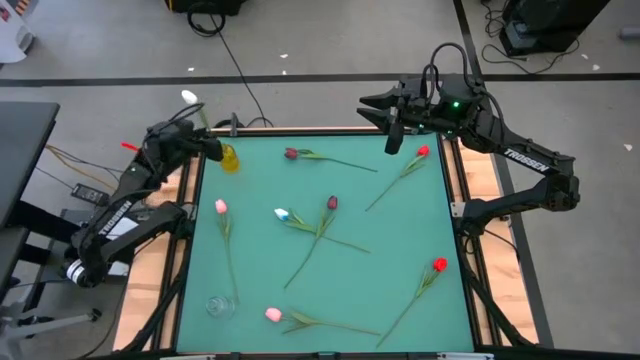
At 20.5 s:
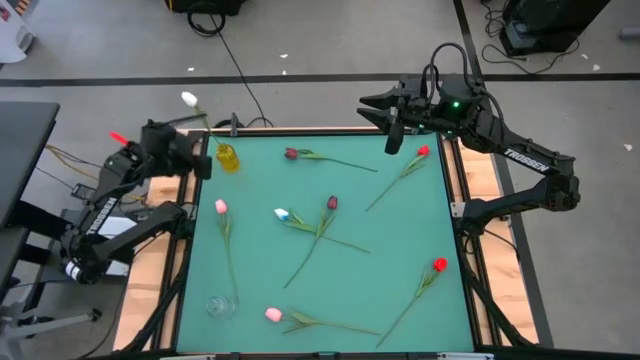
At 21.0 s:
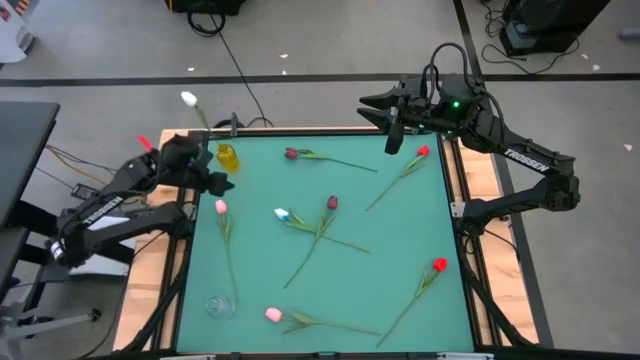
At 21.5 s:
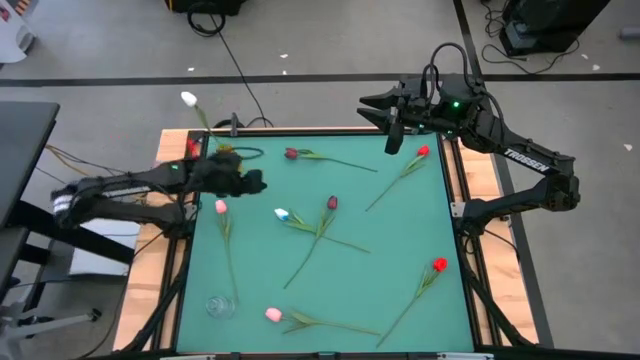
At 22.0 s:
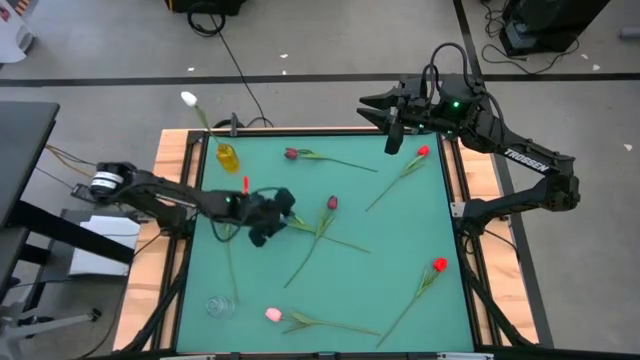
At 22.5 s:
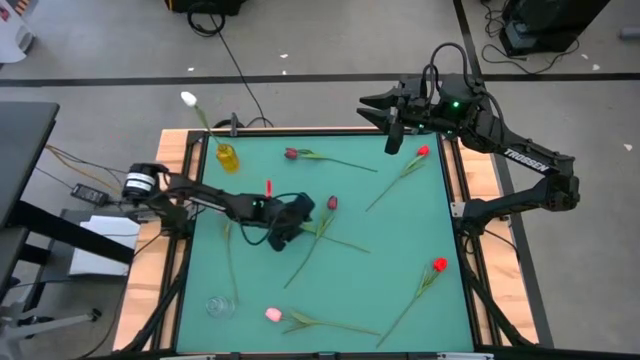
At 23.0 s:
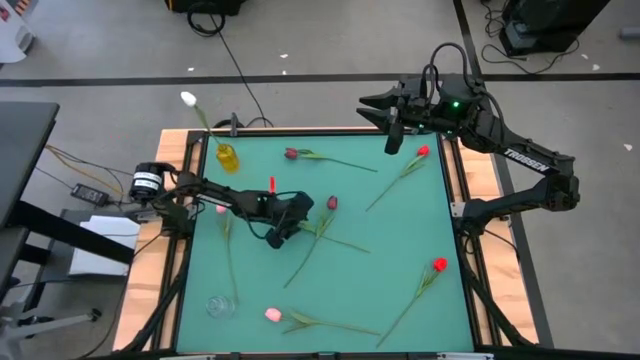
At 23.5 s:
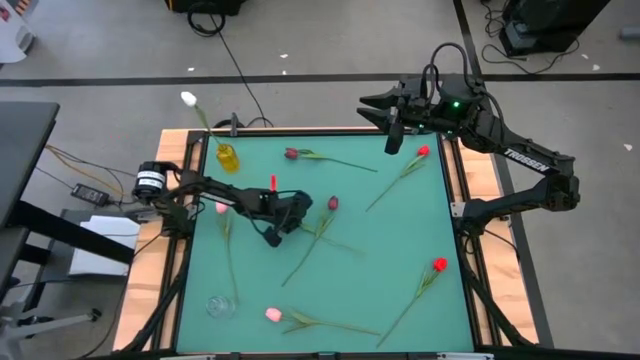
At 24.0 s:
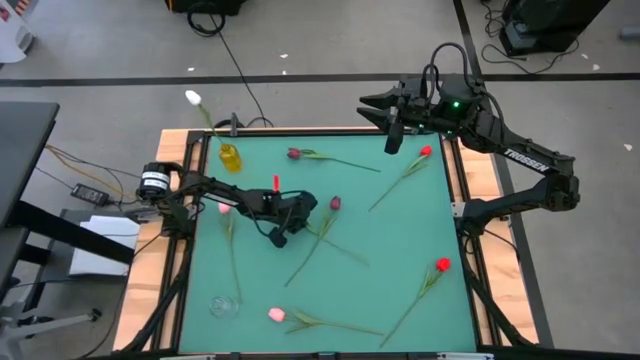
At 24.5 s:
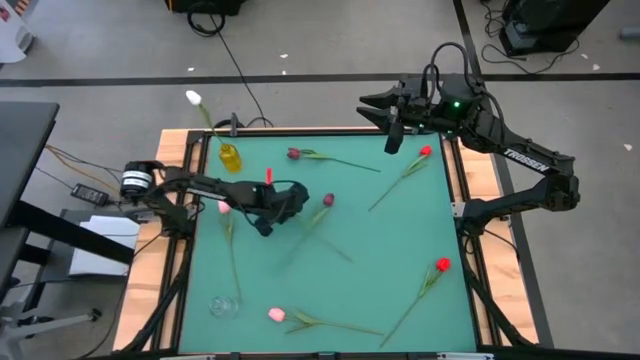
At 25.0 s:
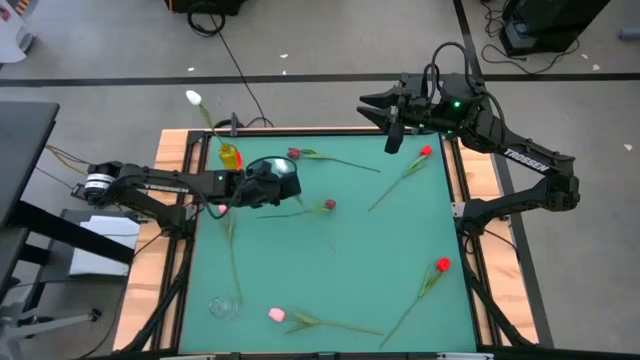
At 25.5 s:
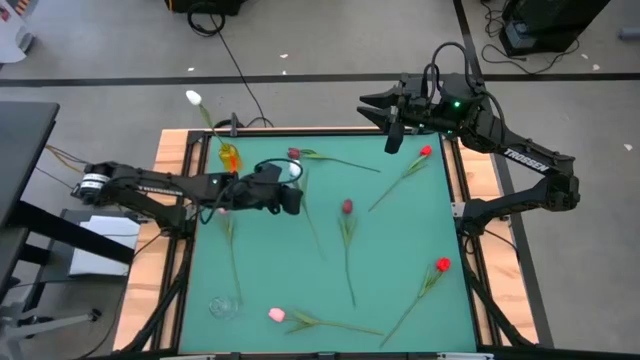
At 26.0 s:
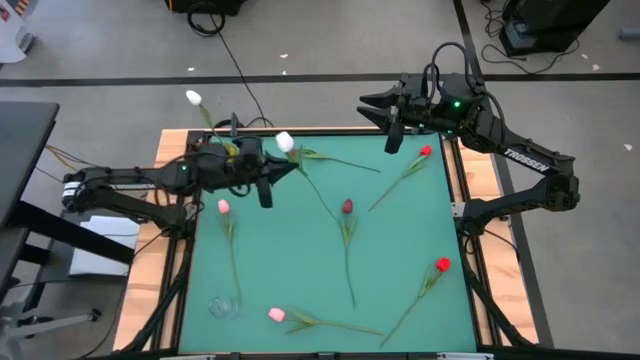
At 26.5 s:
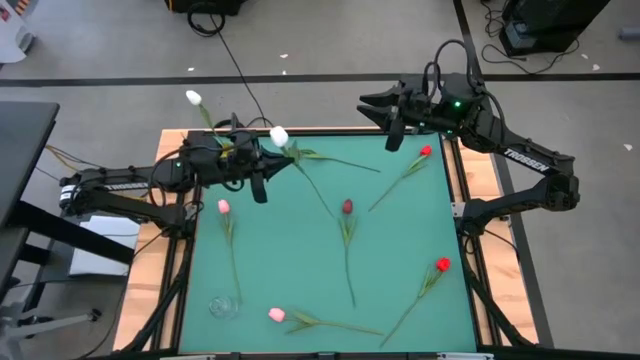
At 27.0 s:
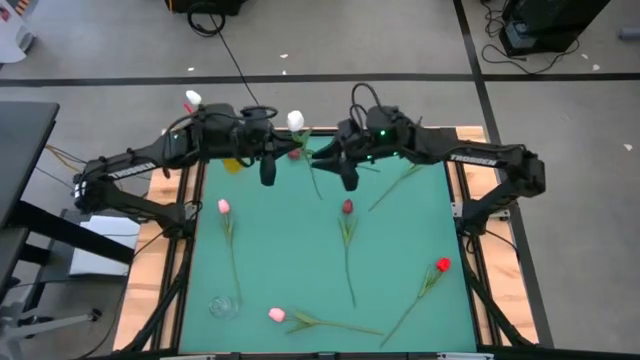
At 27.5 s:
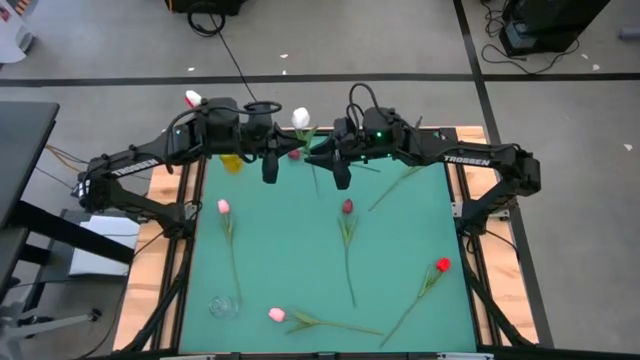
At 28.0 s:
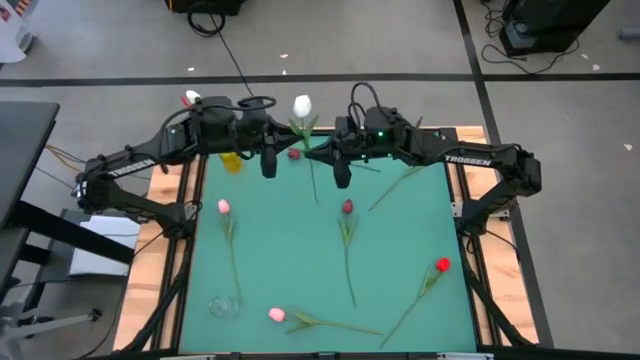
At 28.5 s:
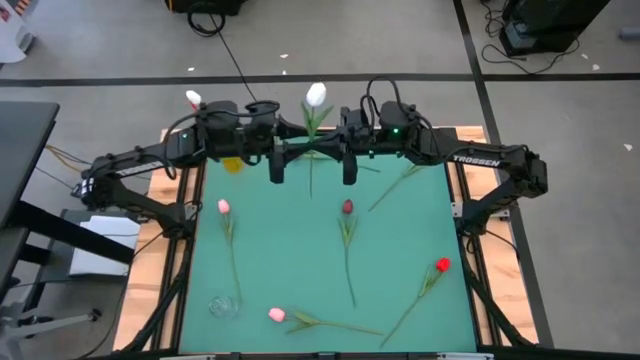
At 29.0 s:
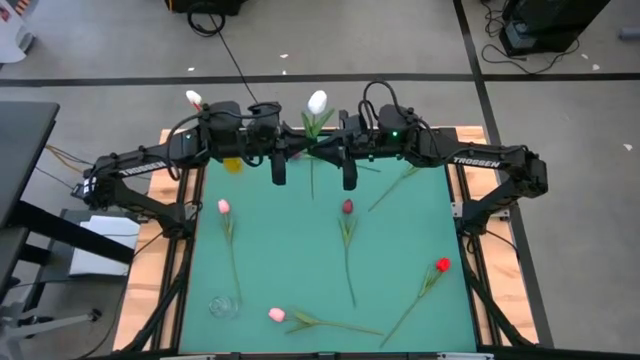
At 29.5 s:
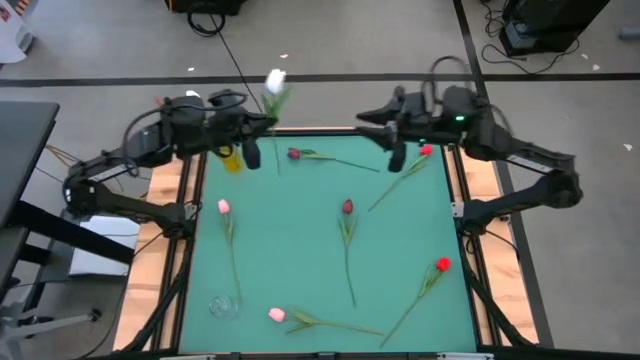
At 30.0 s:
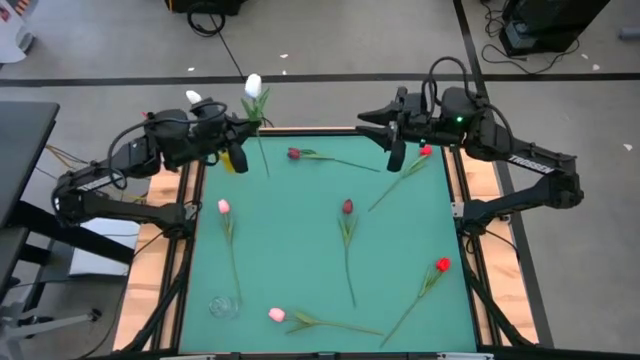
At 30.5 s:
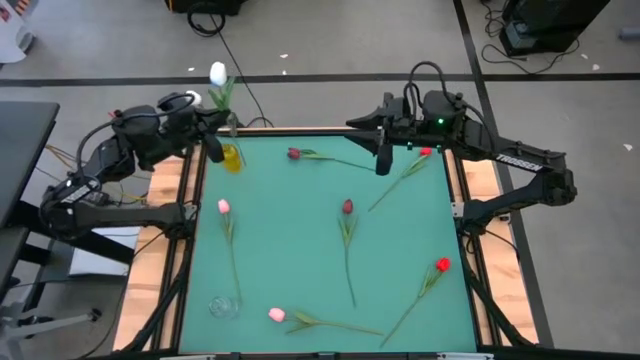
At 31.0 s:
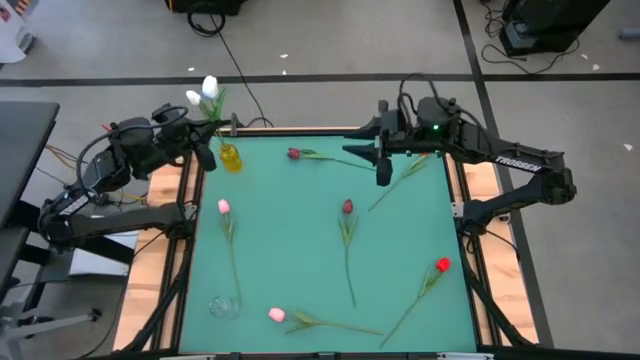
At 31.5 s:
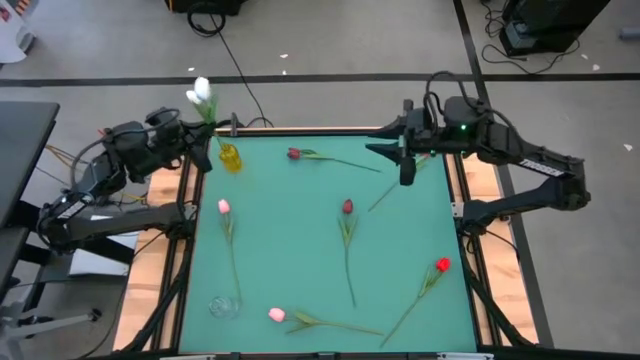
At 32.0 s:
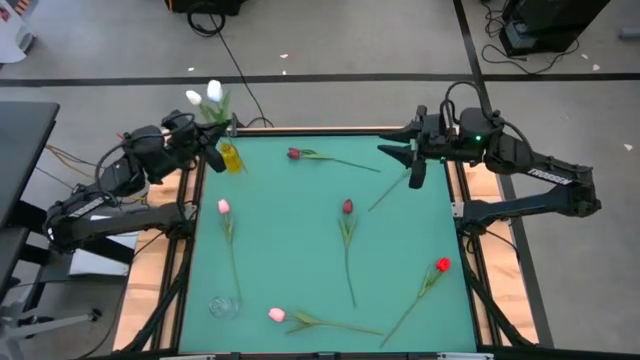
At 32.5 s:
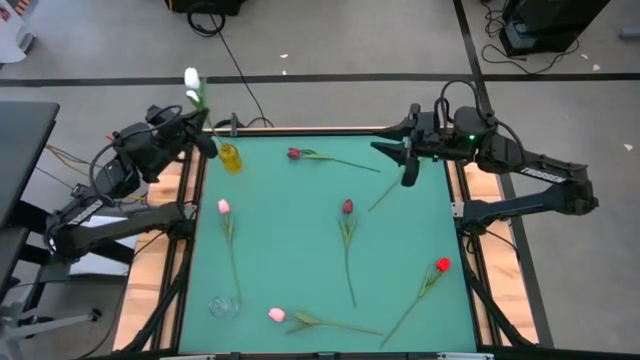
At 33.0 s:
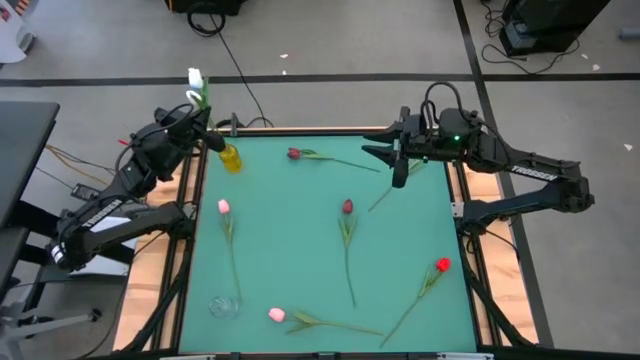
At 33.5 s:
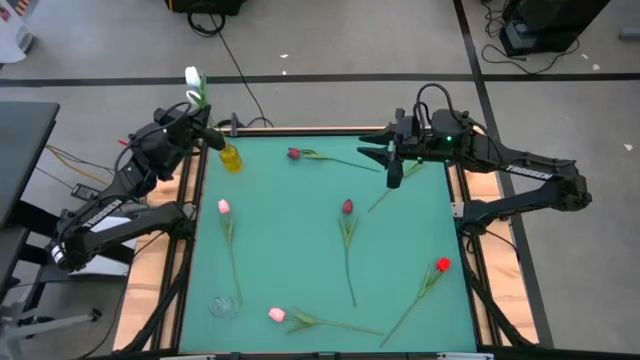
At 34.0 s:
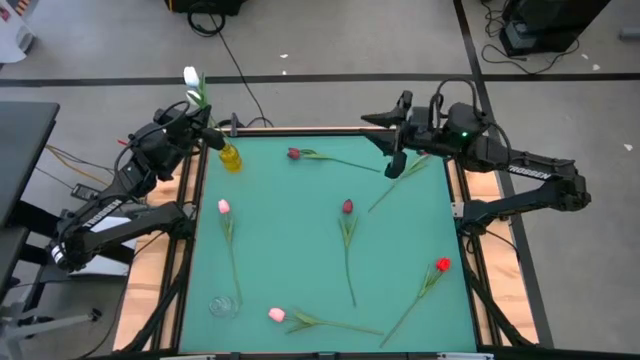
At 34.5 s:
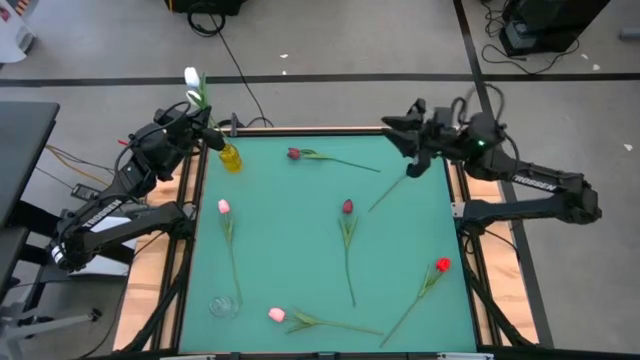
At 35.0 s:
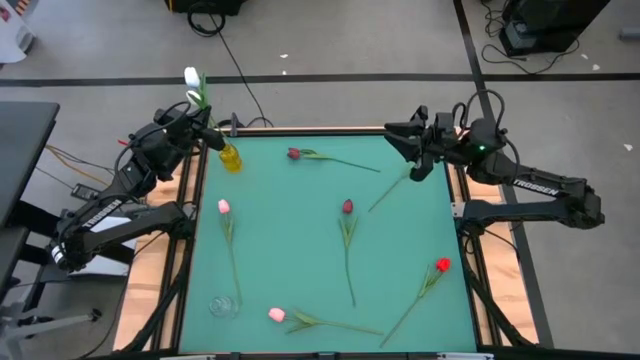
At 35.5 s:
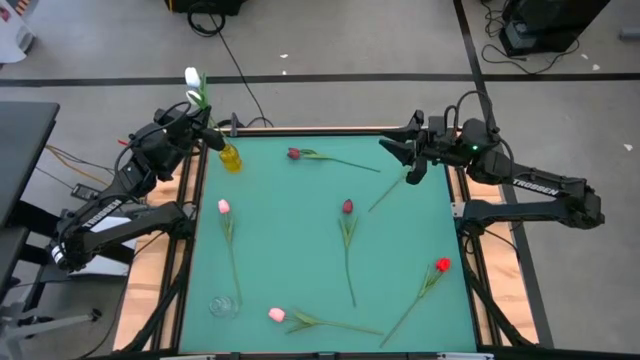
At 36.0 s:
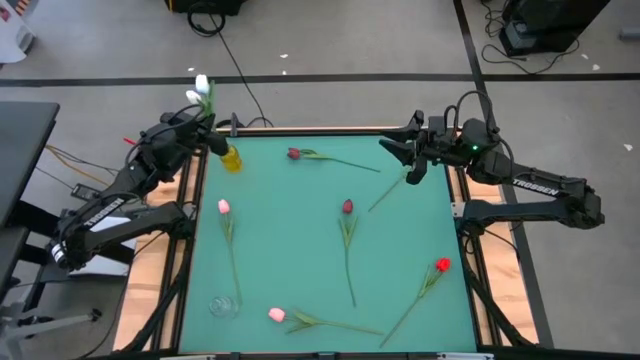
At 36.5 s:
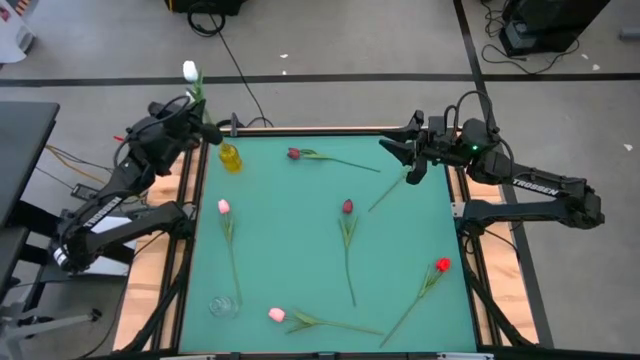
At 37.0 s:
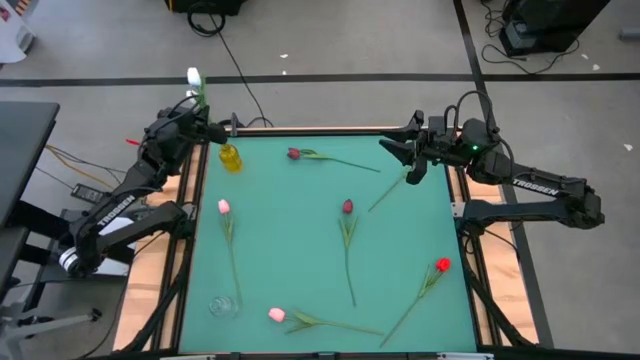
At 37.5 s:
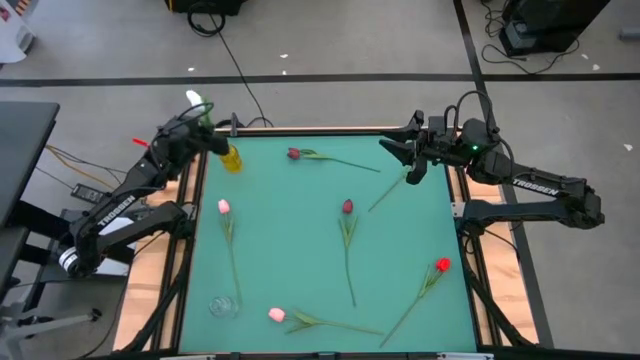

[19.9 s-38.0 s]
Task: Sort flowers into vase by color
Put the white flower into the yellow vase
